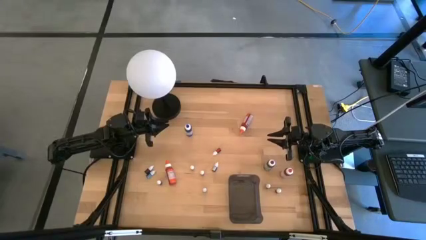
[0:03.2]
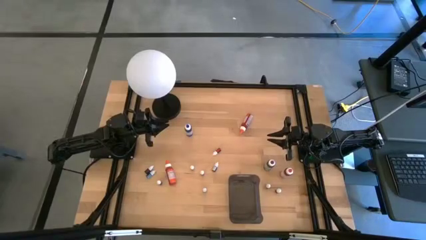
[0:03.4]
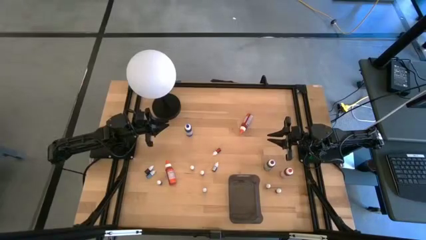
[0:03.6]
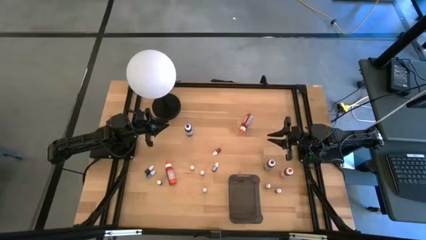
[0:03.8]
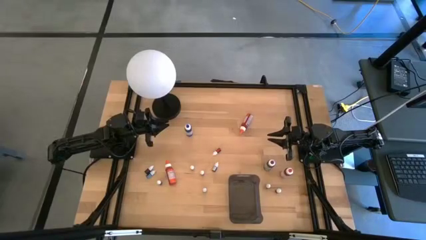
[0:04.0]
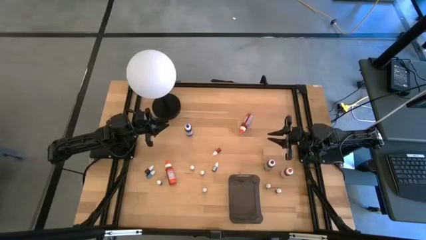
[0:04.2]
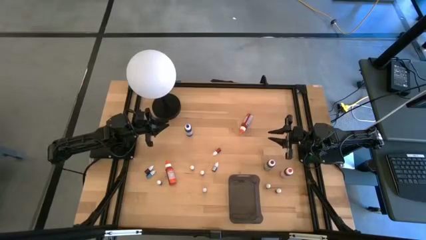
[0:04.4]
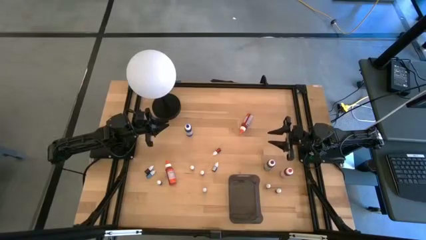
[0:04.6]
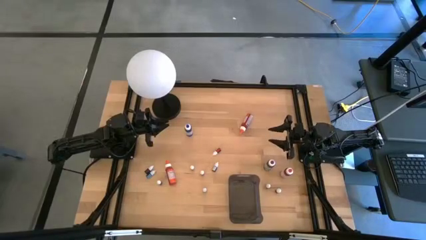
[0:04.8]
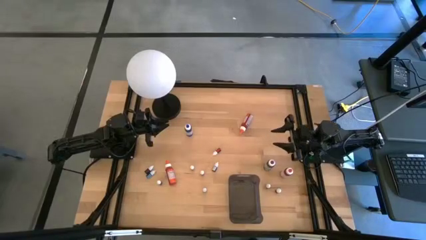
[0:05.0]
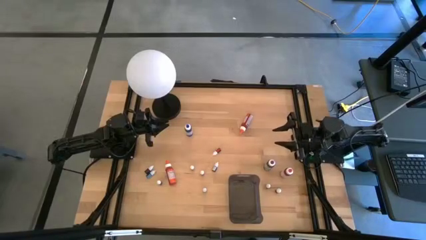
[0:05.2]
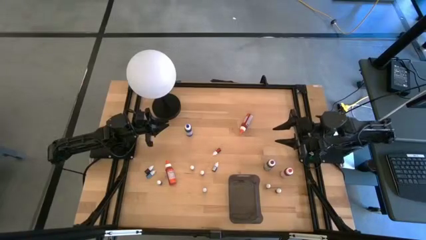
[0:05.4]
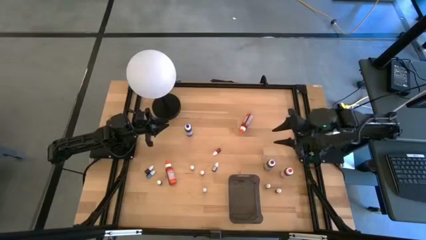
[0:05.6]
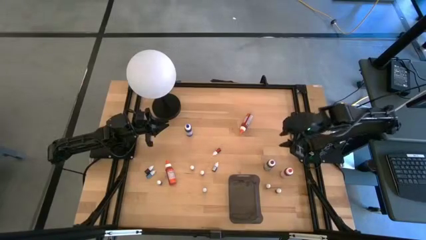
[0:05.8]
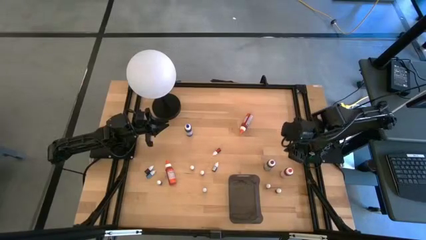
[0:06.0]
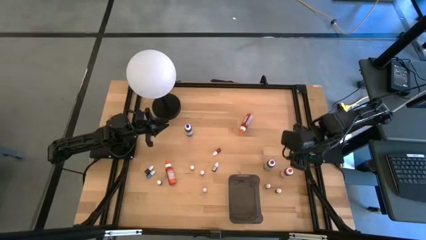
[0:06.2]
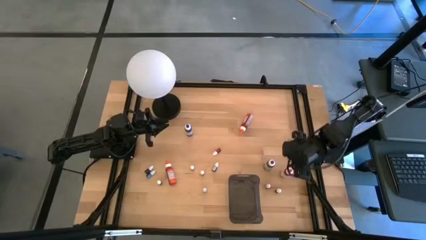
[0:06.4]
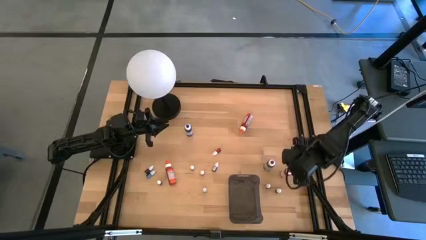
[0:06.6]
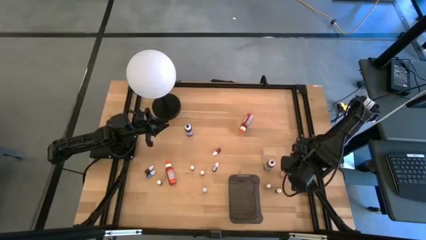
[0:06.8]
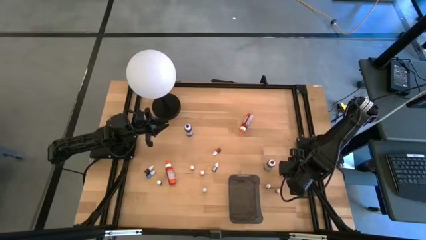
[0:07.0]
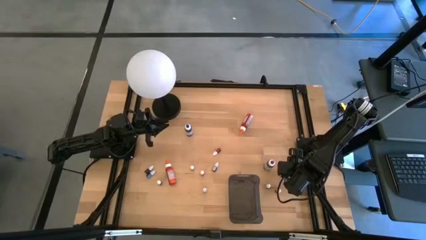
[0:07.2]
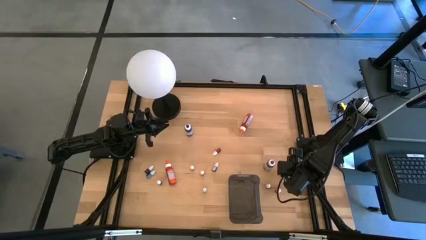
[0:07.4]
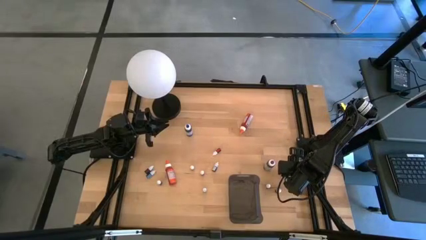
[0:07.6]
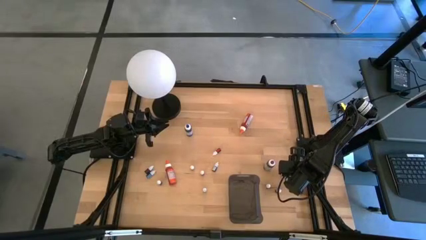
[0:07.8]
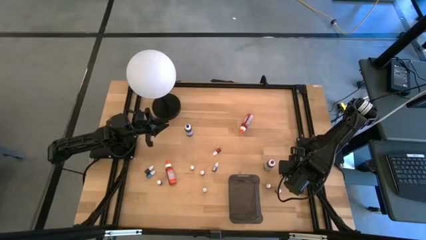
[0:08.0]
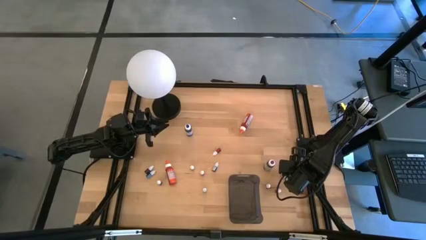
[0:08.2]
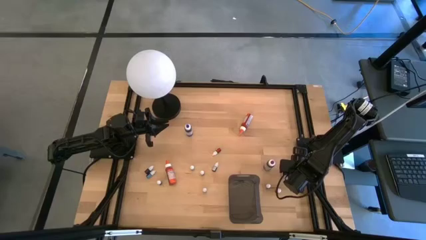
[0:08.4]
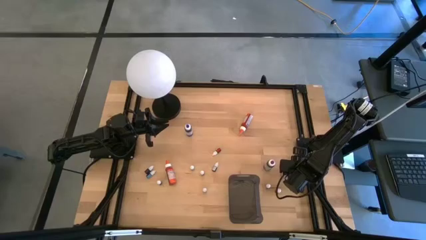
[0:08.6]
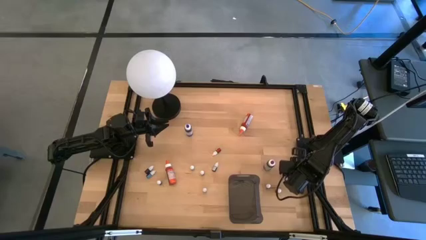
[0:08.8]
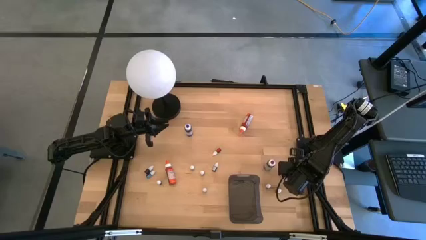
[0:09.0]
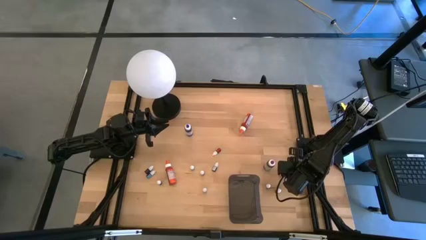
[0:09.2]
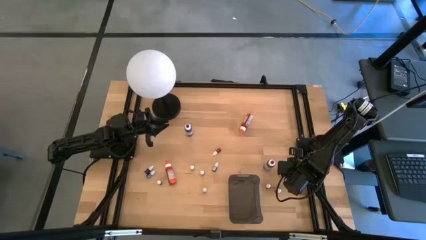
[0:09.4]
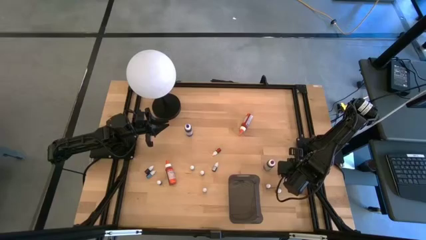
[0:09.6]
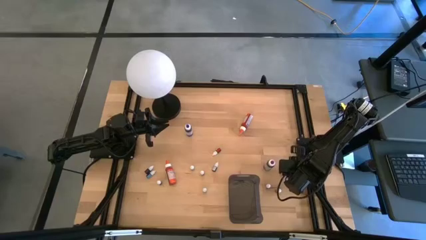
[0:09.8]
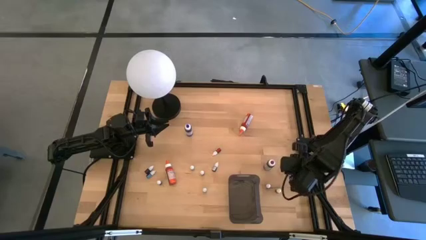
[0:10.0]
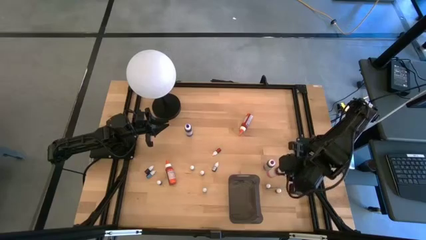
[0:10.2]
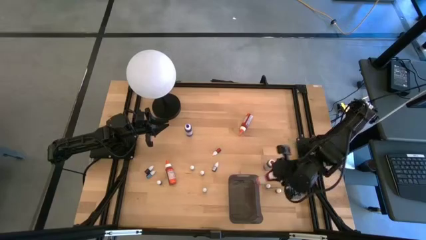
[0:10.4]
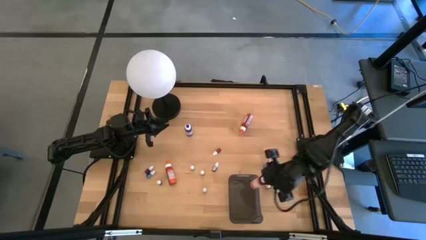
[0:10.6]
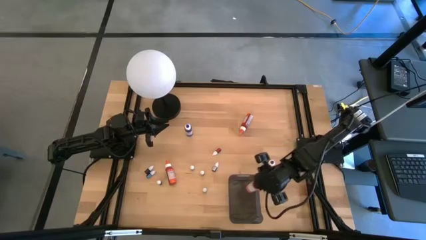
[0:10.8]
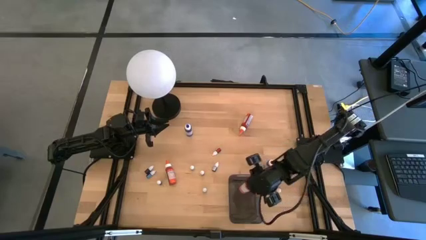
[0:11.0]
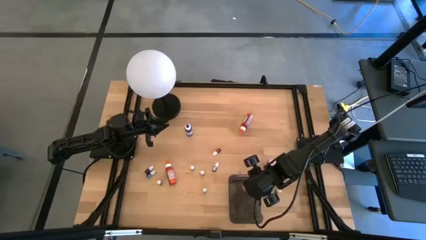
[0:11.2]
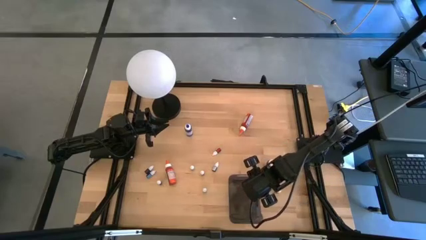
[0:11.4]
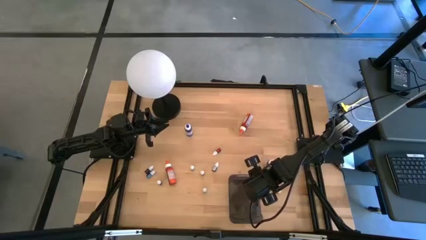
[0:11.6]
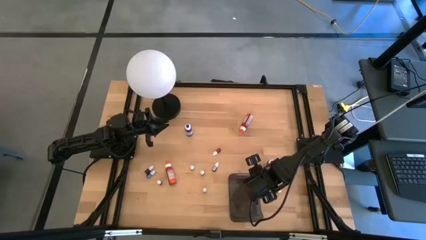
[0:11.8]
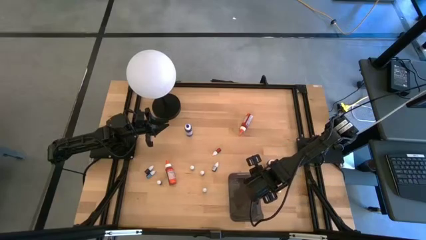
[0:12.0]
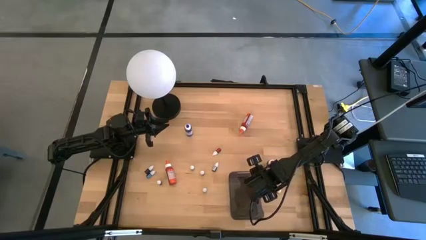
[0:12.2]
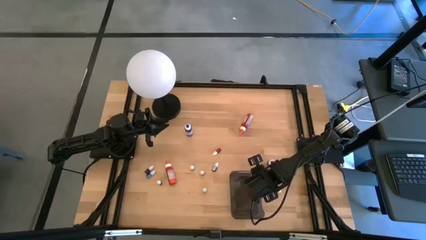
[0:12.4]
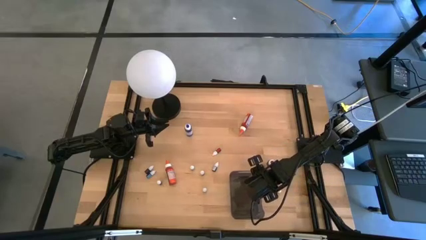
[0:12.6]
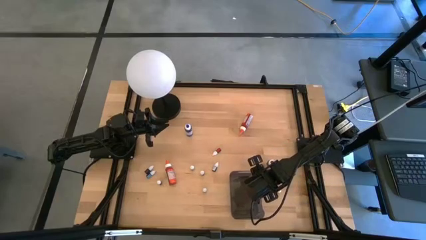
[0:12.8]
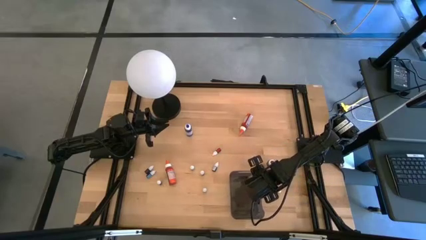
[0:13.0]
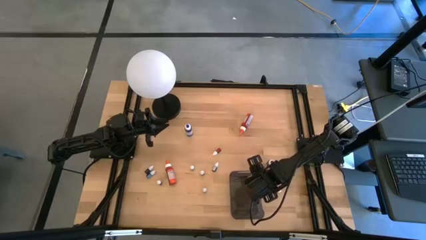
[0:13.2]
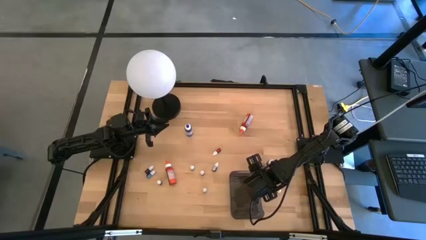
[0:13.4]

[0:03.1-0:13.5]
Task: Pick & Place food coloring
Put the large pink food coloring bottle into the black bin

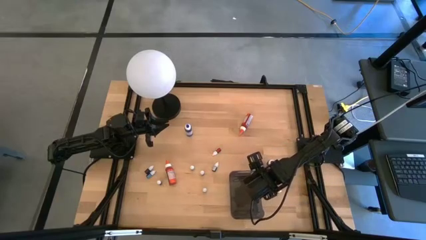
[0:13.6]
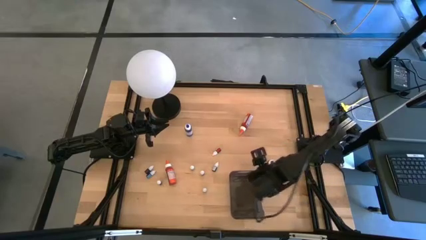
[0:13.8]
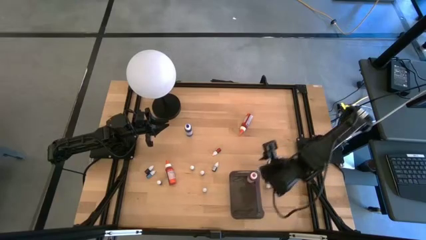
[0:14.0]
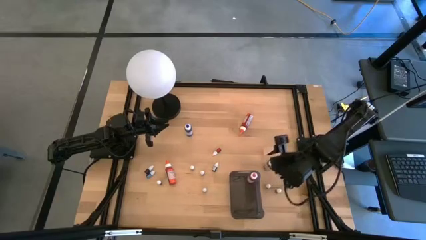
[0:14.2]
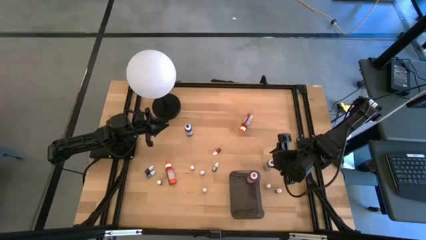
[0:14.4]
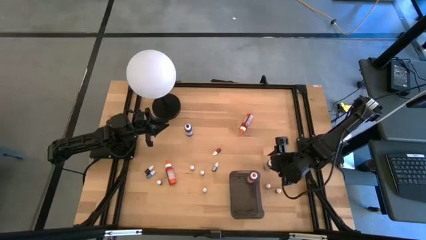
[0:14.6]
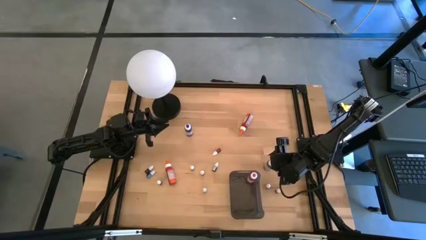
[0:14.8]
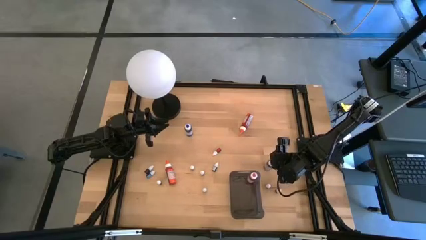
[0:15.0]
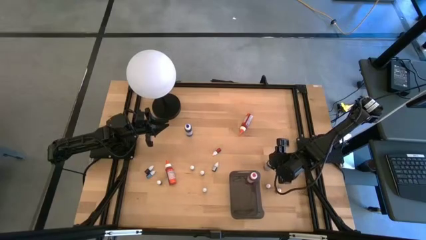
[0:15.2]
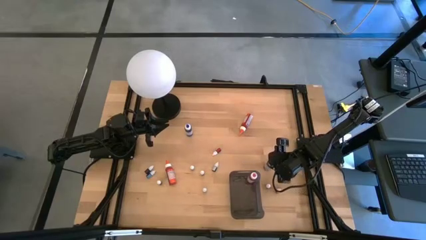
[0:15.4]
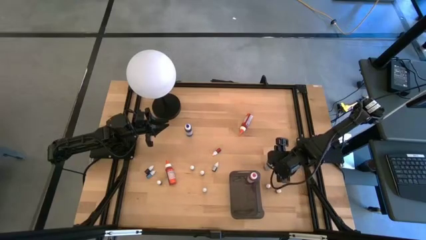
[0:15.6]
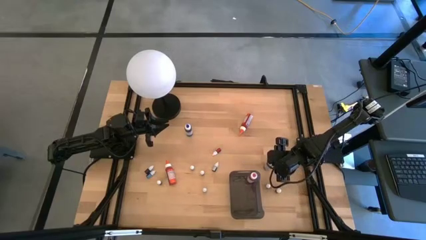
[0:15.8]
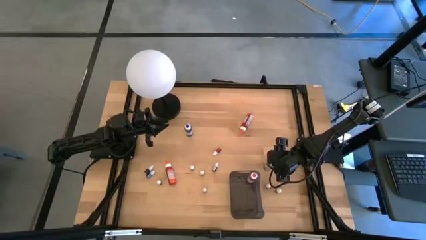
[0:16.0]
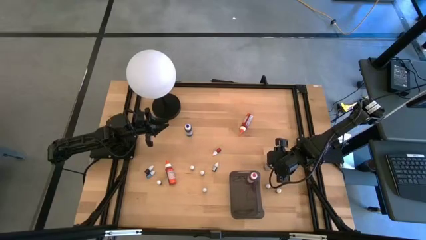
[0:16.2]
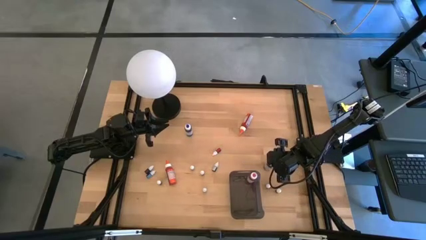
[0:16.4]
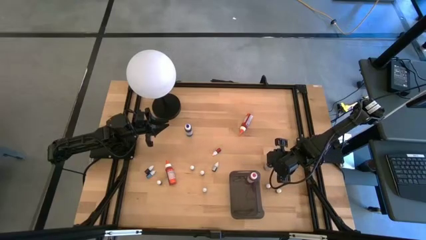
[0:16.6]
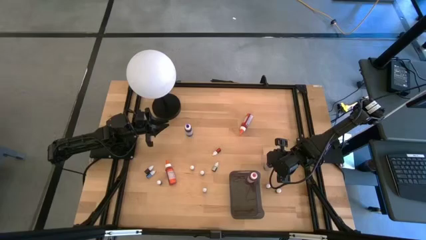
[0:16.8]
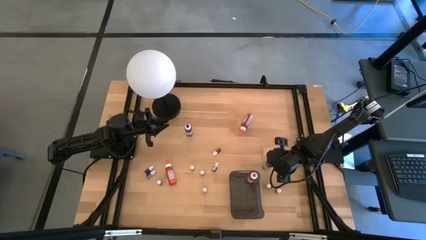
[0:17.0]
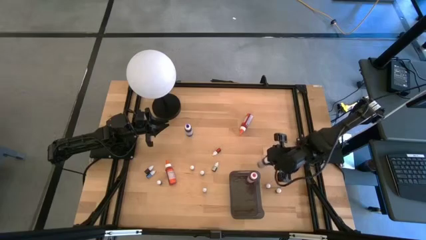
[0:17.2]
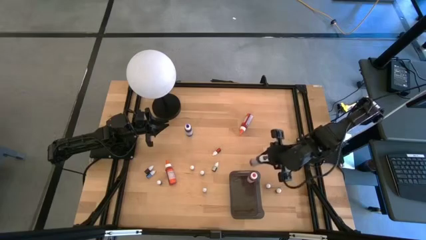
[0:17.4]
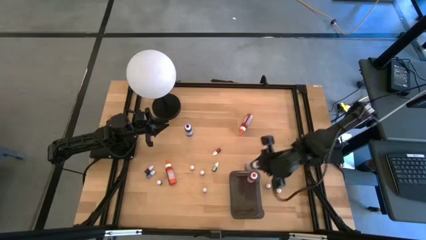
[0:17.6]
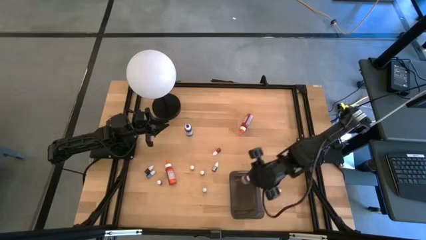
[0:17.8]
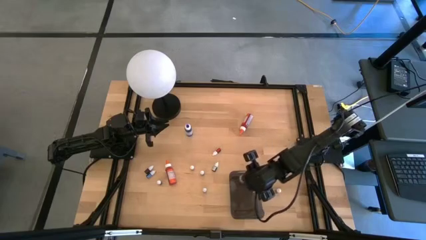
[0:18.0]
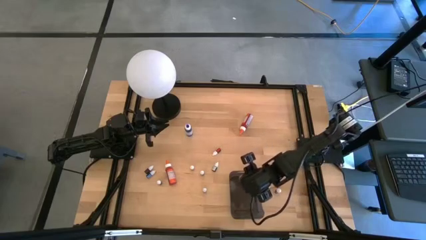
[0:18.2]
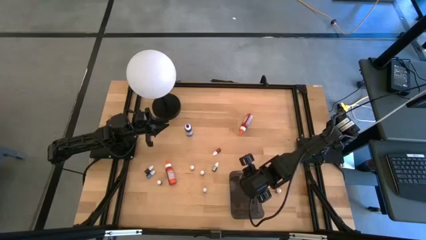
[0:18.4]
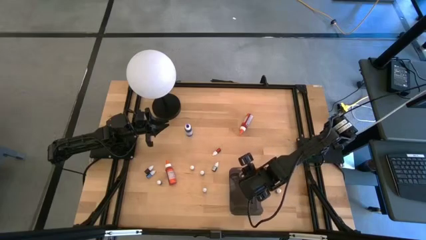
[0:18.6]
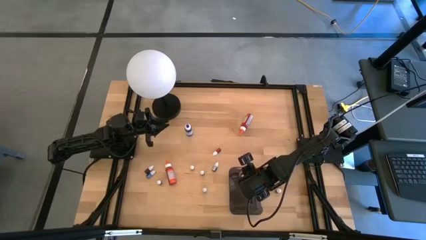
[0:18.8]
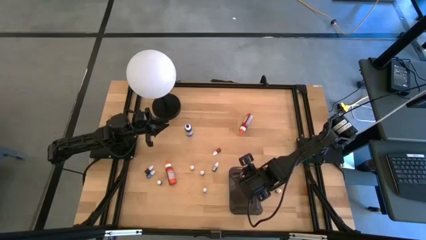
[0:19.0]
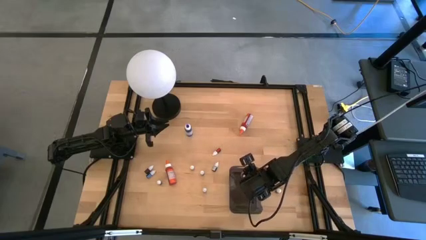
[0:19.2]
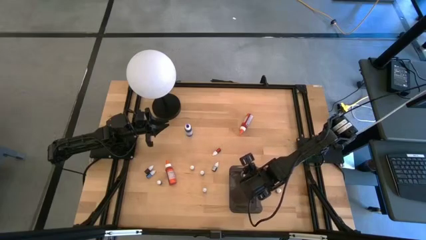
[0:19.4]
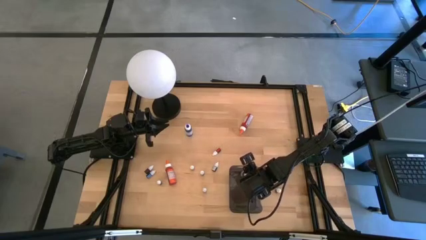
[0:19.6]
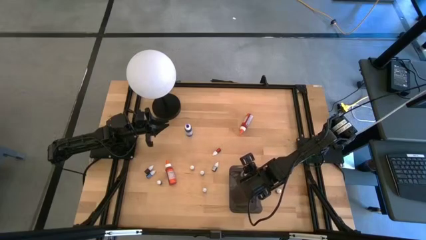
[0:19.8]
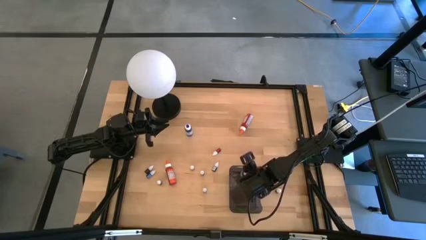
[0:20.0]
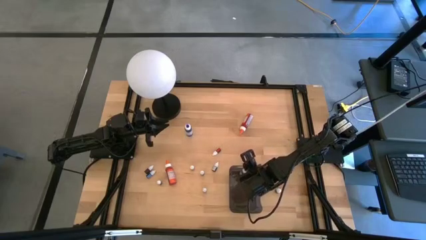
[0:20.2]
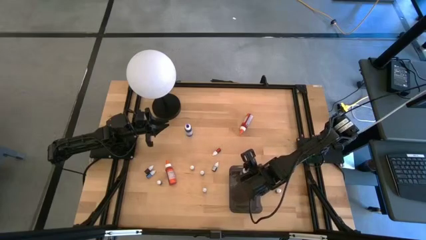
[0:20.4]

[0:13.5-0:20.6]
Put the large purple food coloring bottle into the black bin
